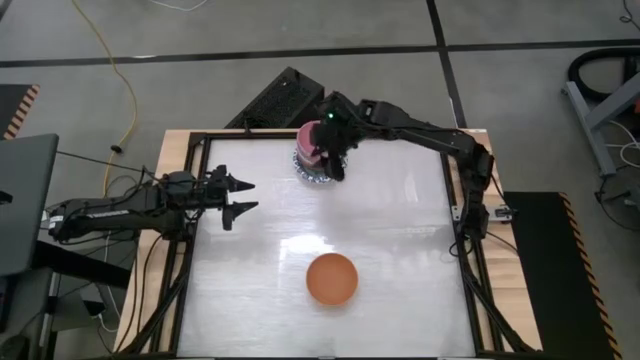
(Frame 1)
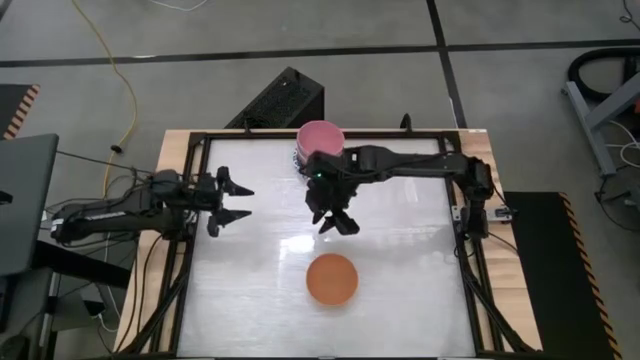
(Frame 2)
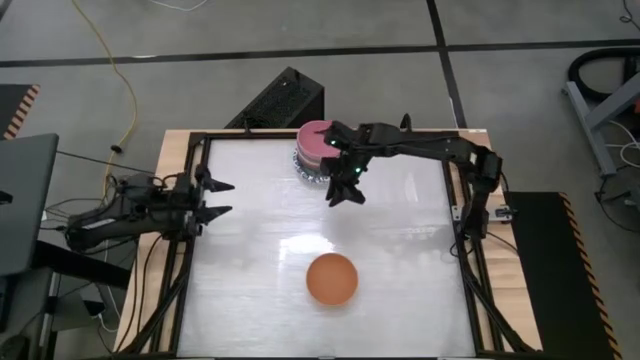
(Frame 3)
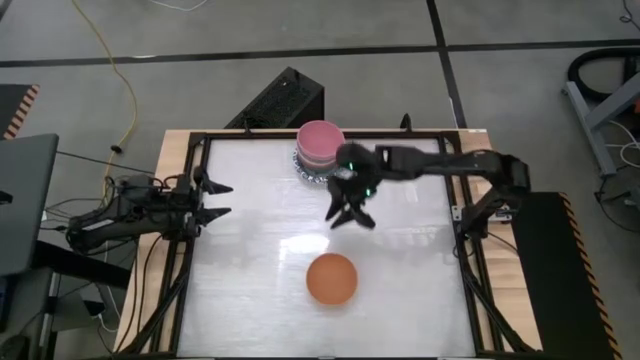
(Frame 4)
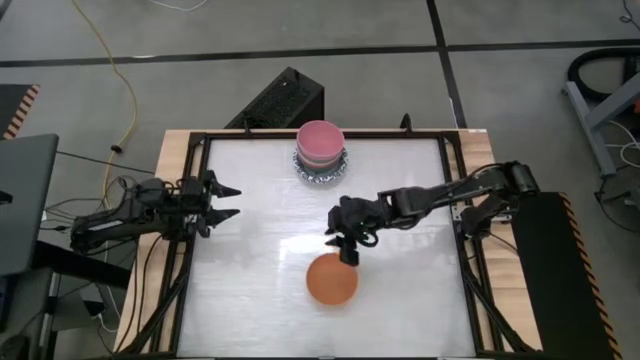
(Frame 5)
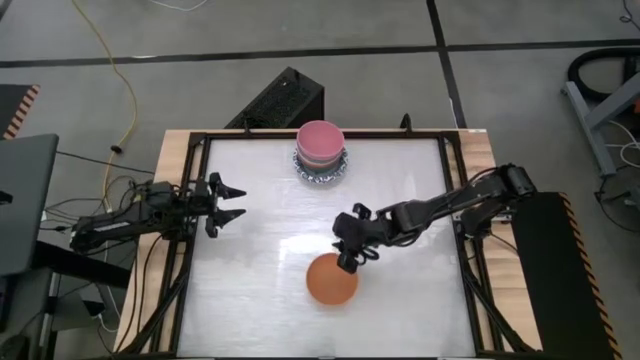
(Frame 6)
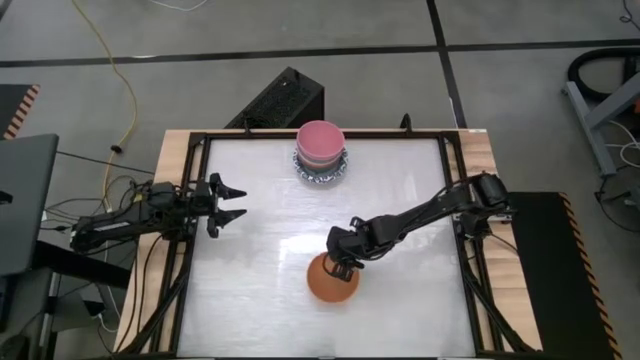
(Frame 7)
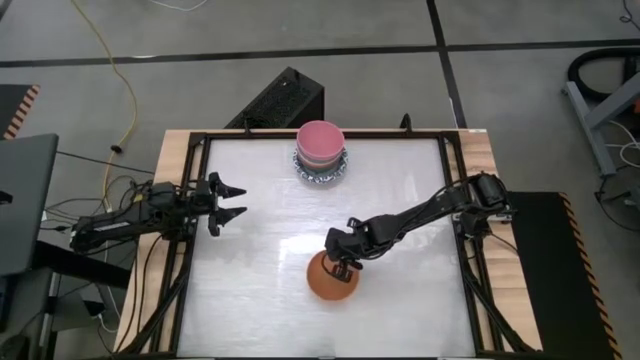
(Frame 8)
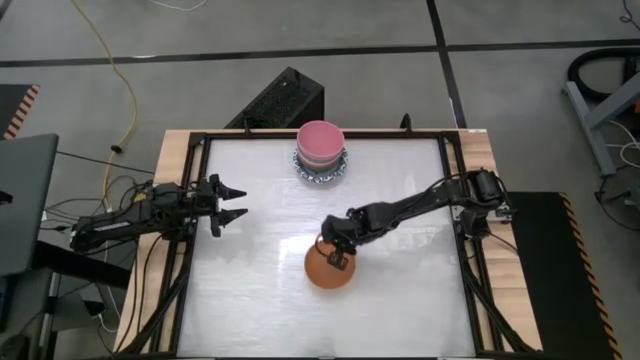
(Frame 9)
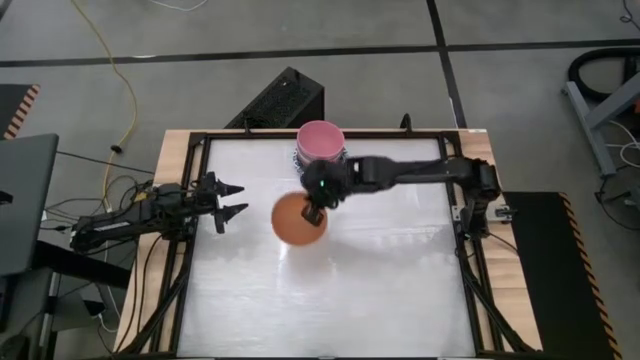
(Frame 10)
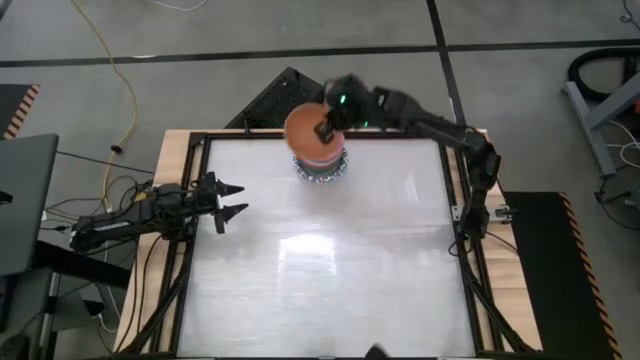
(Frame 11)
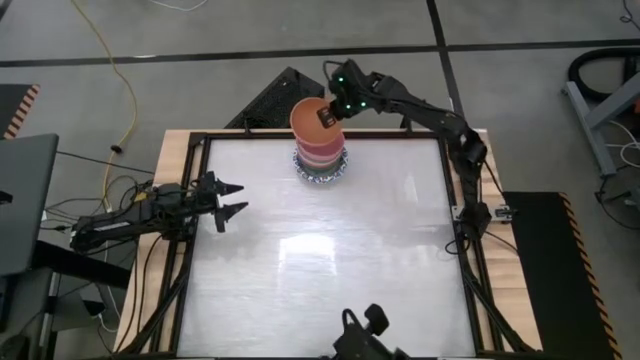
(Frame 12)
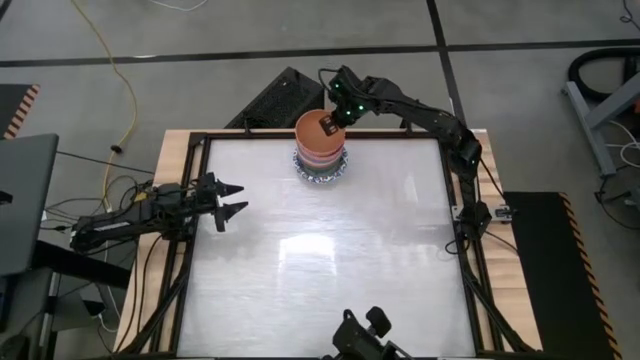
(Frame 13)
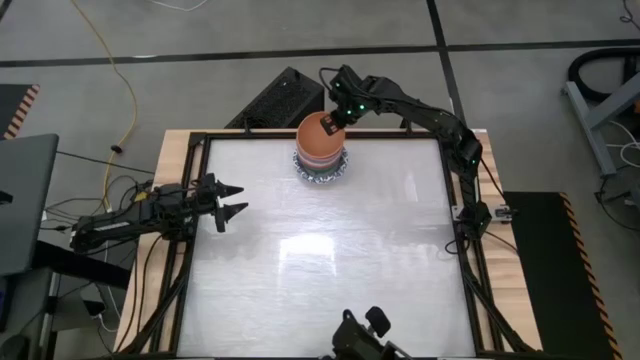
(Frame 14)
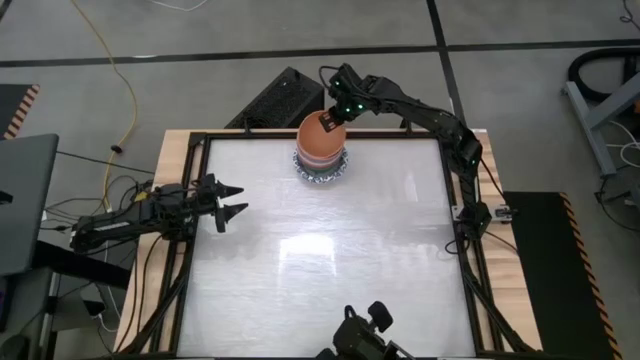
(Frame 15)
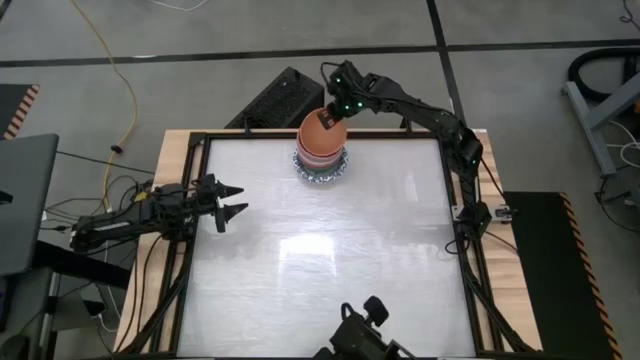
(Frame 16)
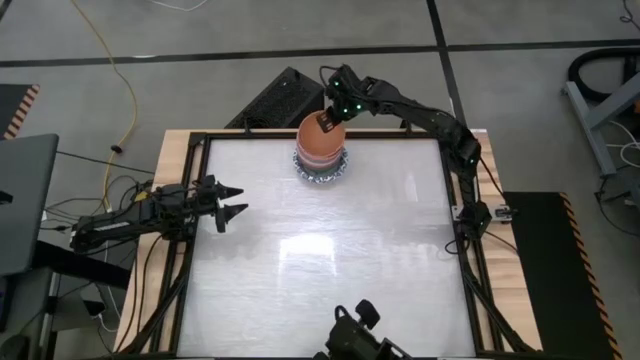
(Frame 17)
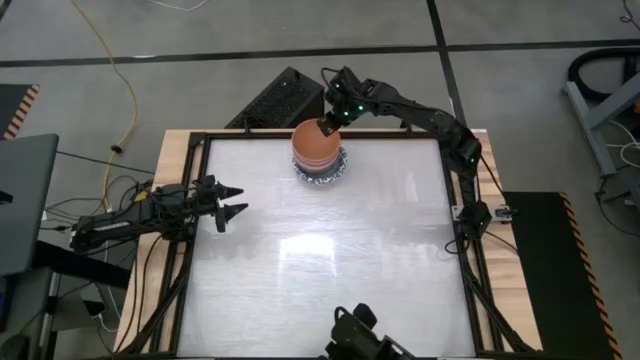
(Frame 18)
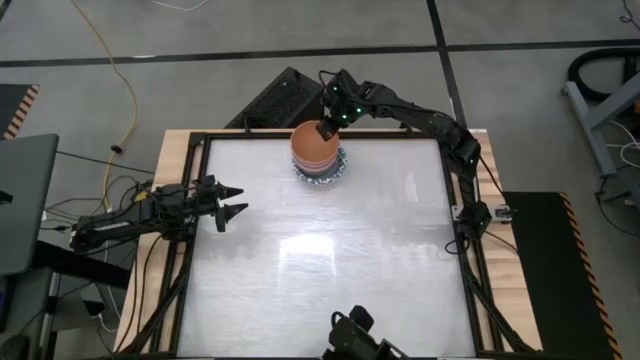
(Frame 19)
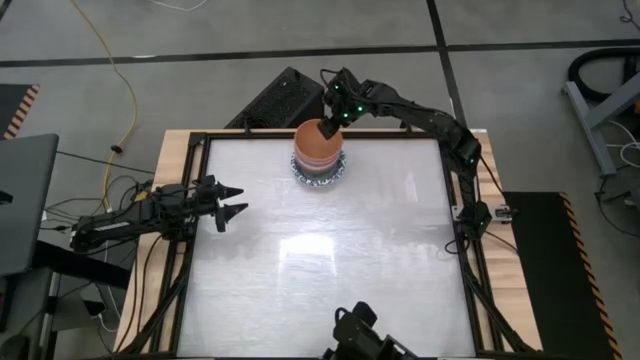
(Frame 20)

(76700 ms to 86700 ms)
Stack the light orange bowl on top of the pink bowl

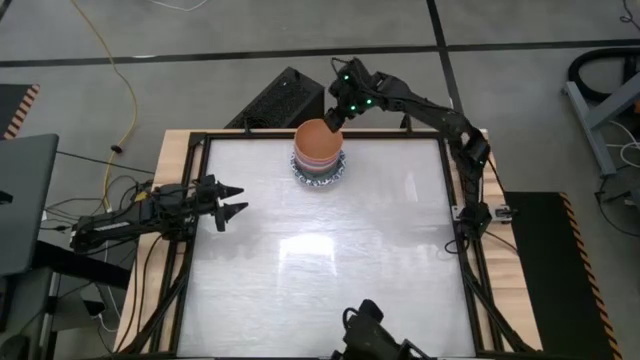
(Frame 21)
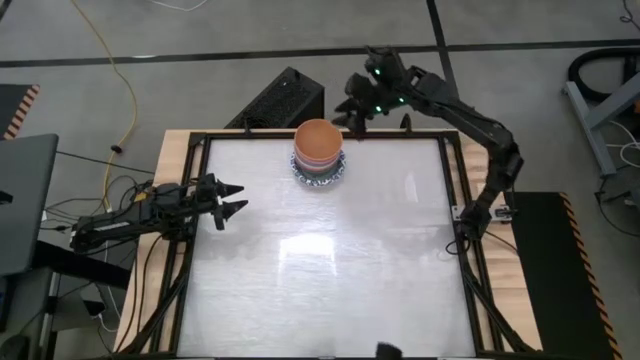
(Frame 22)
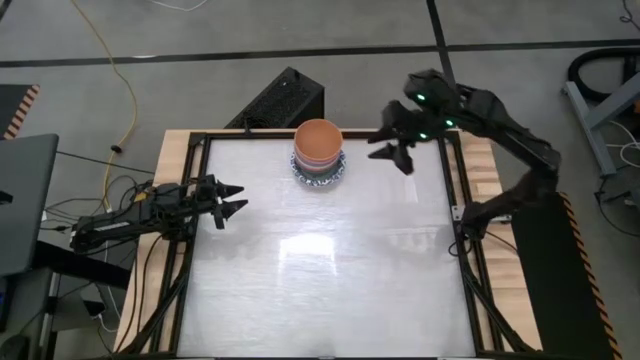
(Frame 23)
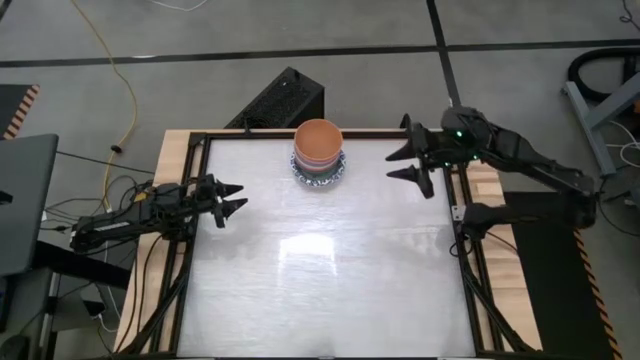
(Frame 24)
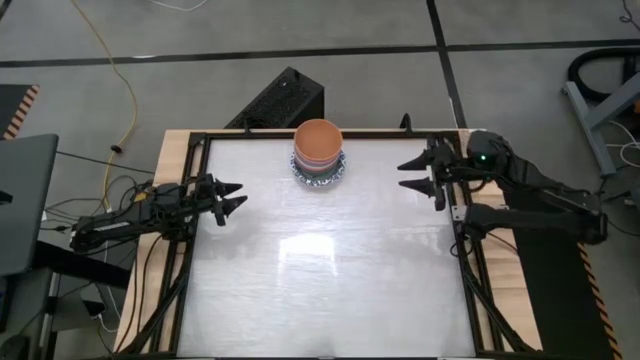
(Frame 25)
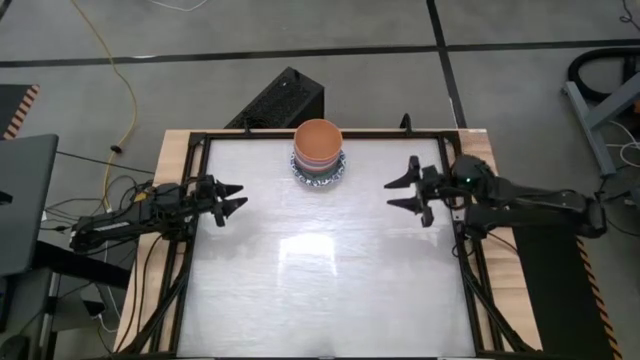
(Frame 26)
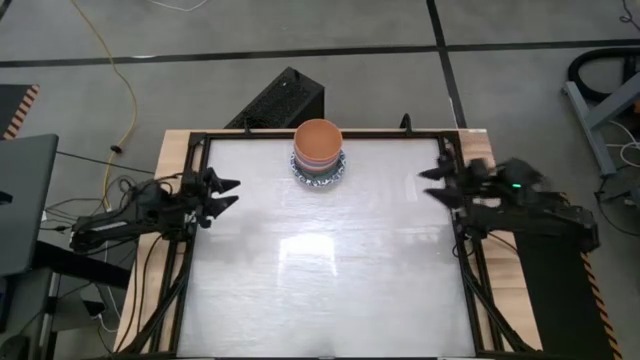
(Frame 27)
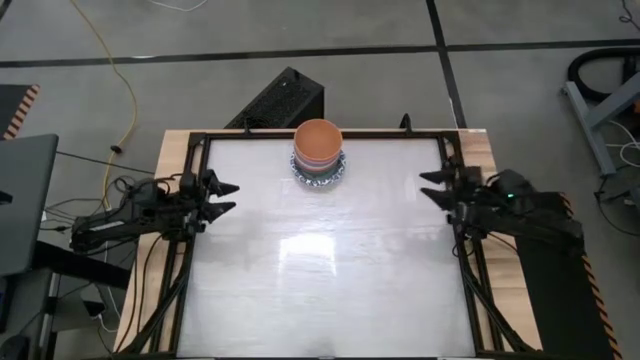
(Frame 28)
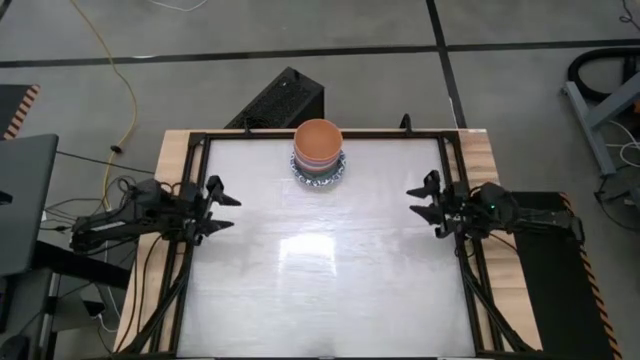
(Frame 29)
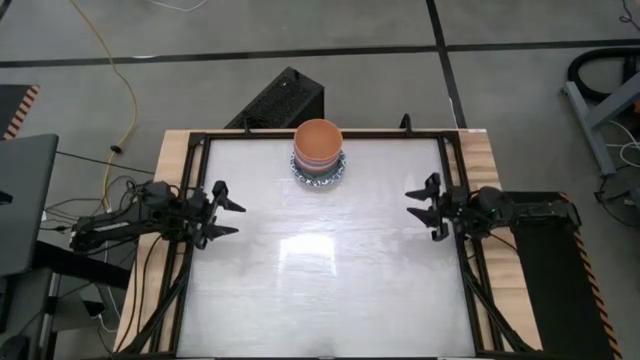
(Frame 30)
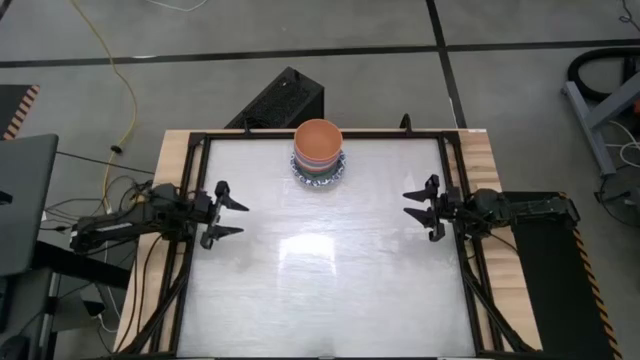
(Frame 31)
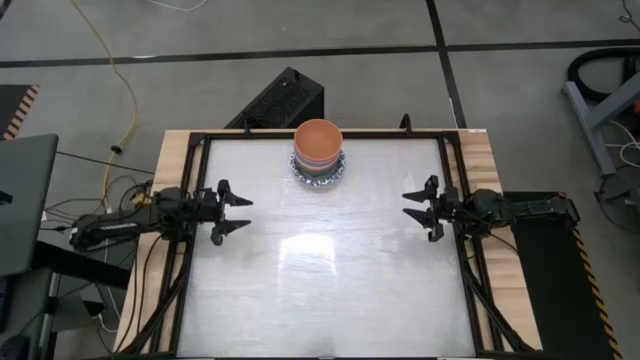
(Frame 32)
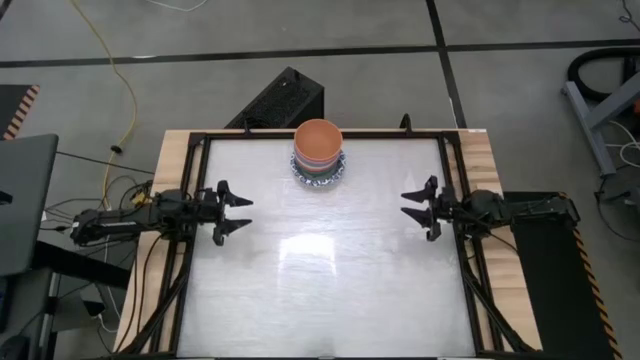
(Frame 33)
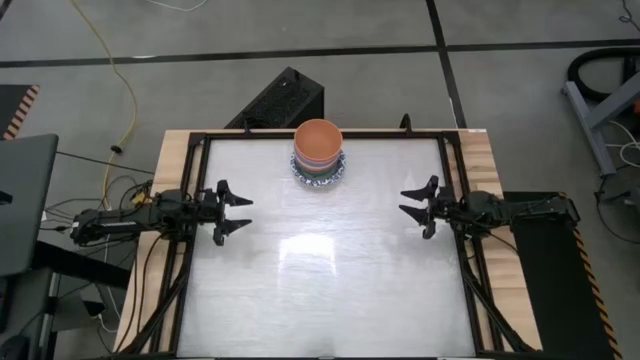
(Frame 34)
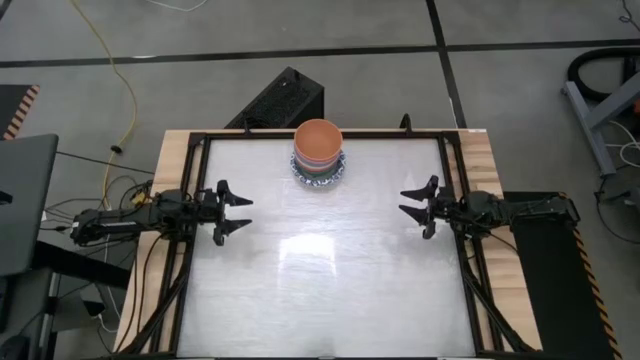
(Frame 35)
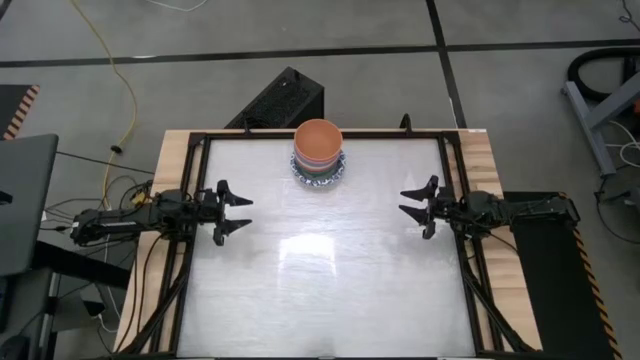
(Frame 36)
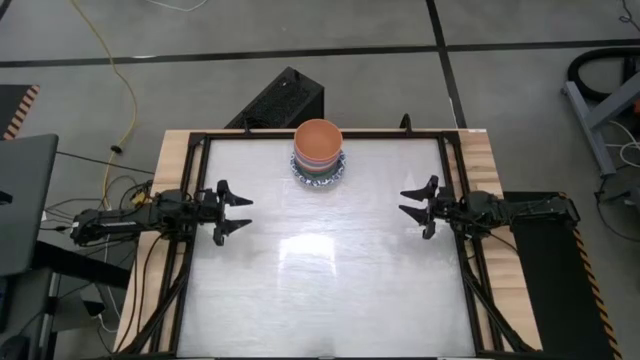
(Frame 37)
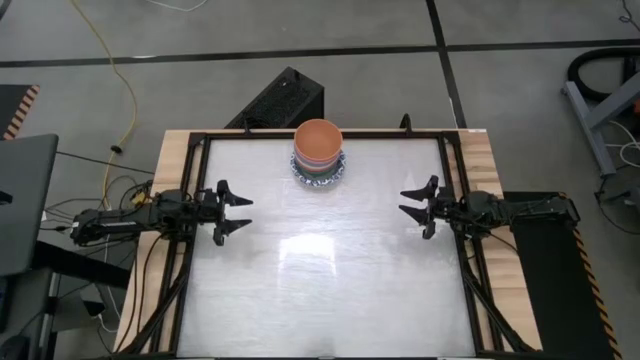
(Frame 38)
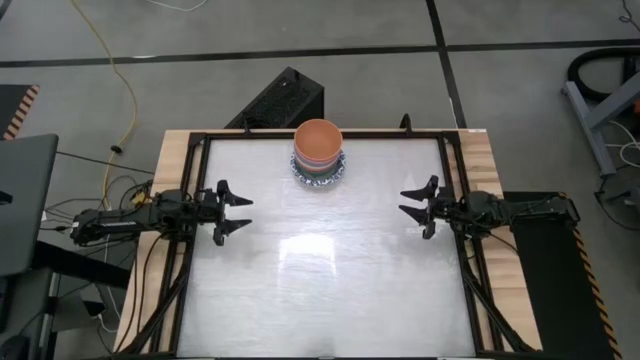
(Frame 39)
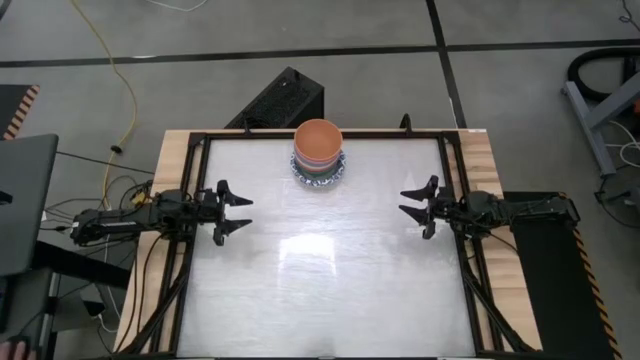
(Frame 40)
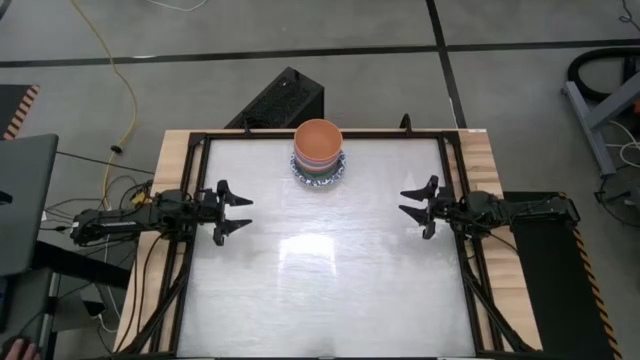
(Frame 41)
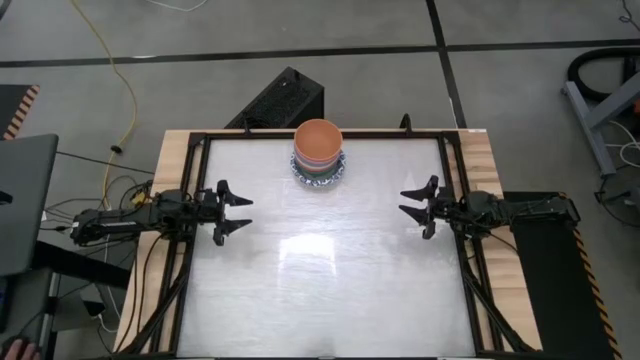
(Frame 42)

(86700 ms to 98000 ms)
Return to Home Position
